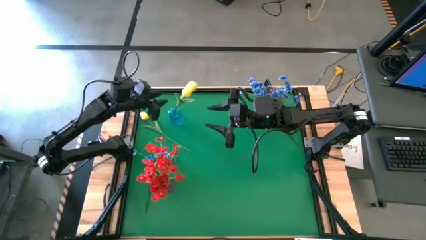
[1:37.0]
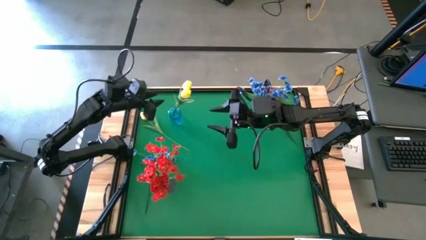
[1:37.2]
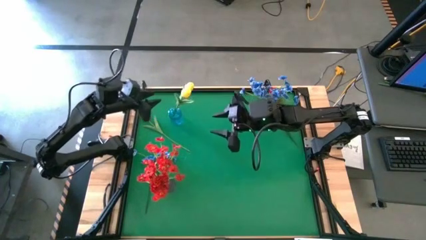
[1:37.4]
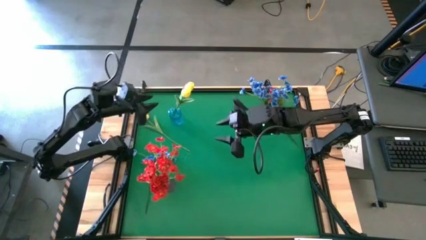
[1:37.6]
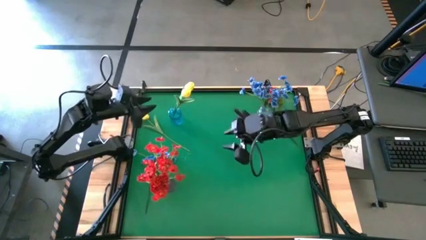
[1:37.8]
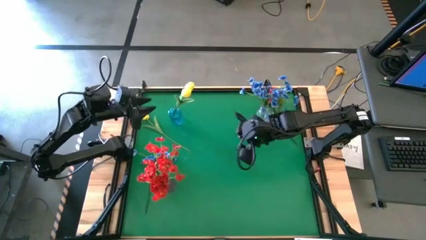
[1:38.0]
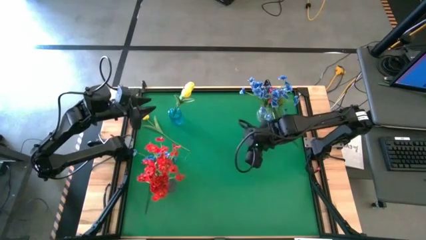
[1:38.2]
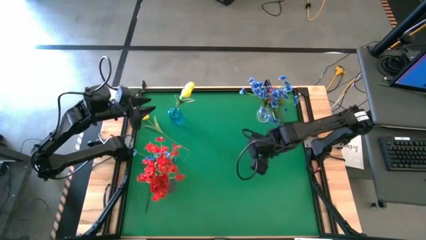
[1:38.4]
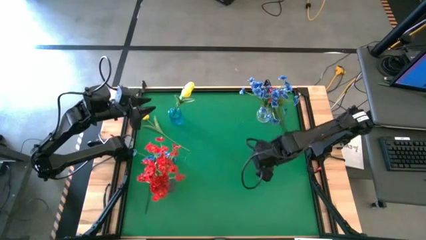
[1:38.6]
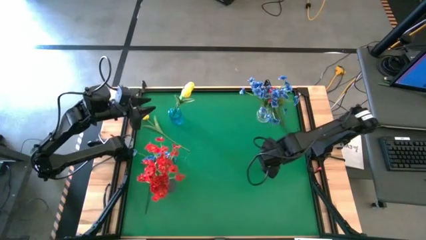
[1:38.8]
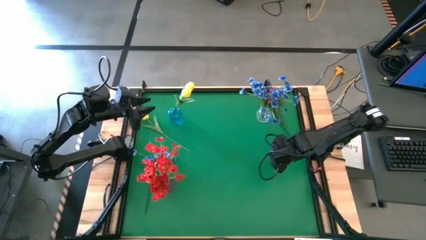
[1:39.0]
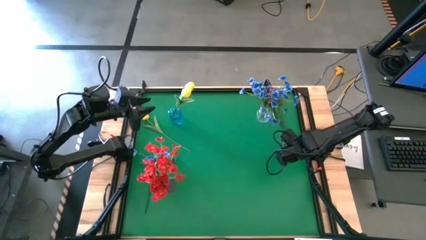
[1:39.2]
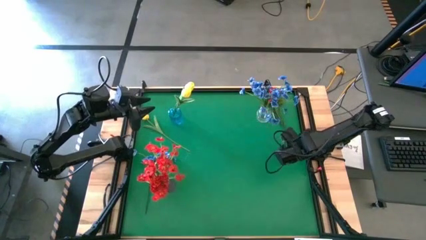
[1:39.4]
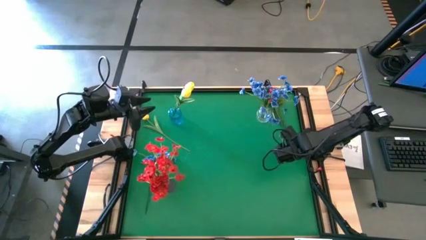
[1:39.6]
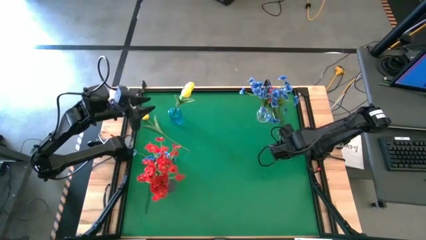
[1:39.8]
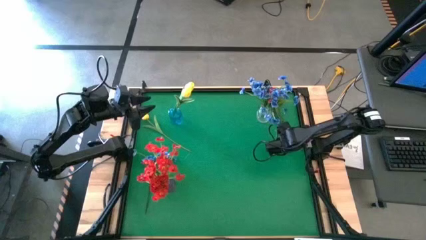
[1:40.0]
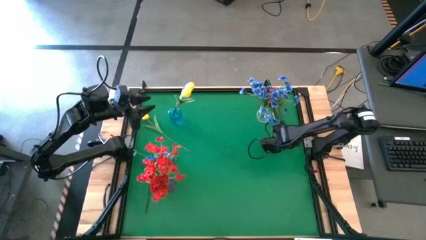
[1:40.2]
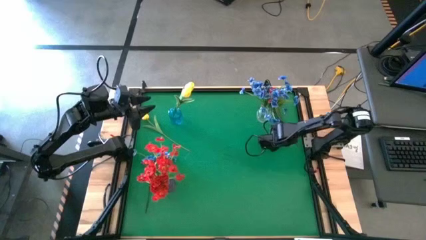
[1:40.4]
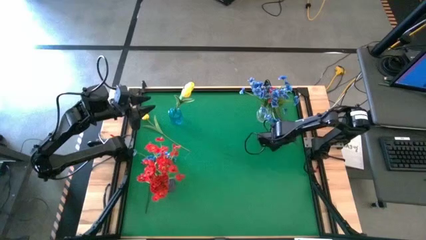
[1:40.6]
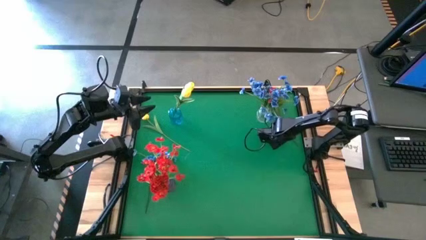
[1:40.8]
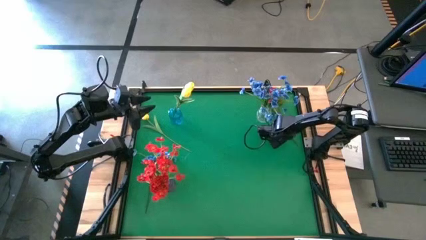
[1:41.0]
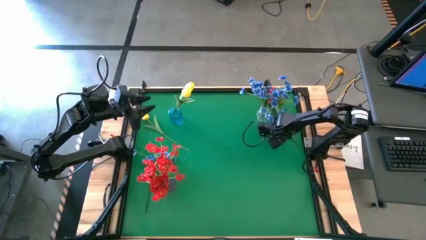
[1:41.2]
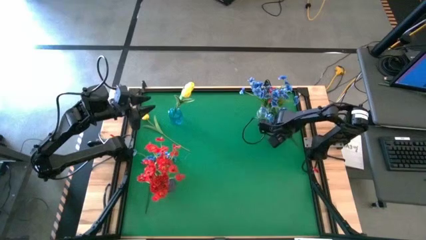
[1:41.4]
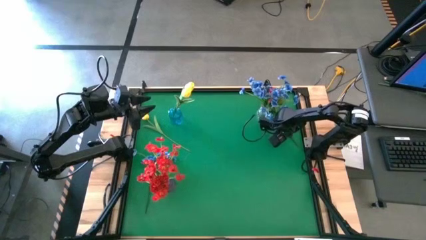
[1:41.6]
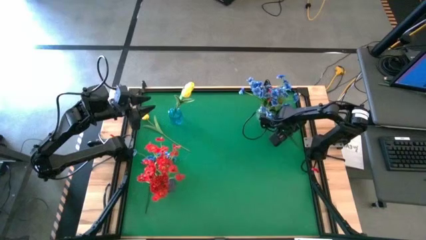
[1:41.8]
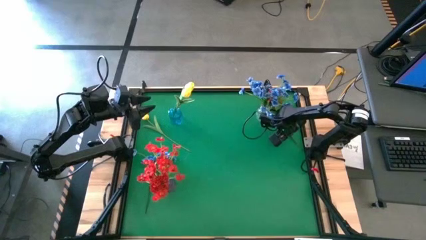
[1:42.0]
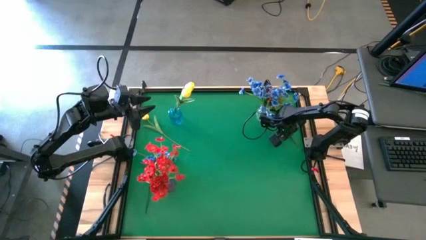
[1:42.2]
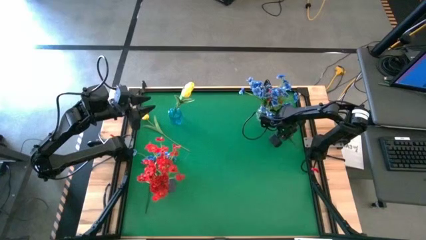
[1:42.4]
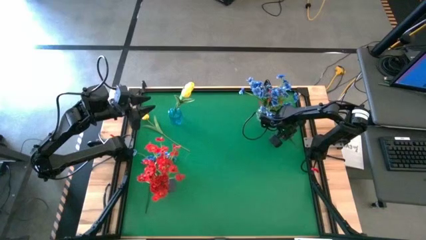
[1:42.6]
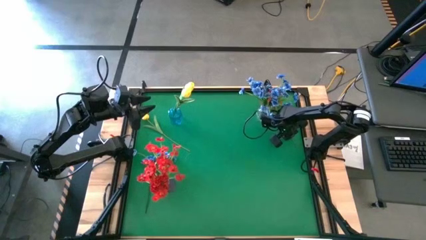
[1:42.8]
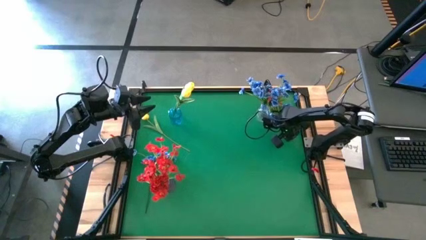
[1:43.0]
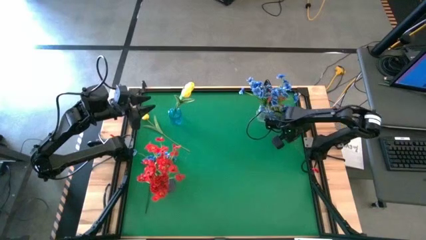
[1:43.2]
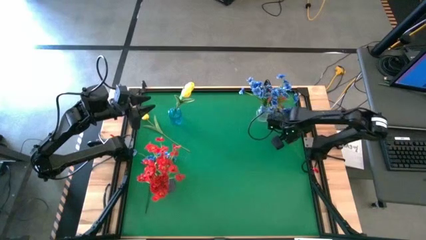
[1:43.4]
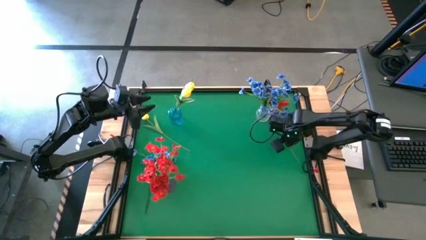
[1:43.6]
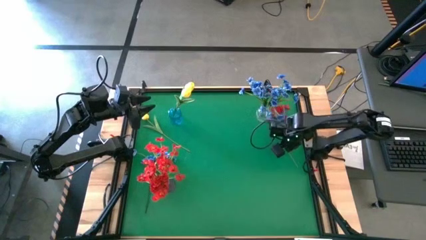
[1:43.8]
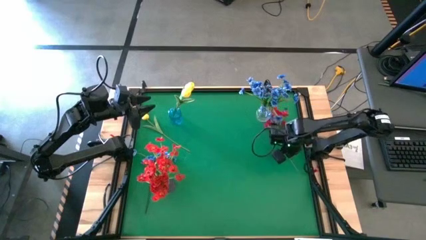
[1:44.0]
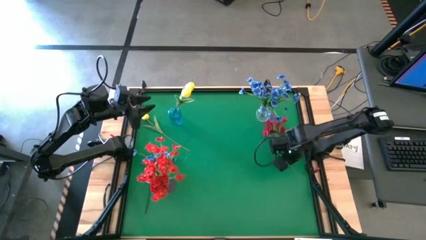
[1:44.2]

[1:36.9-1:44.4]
Task: Sort flowers into vase by color
Put the red flowers into the purple vase

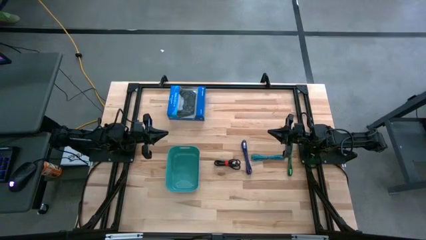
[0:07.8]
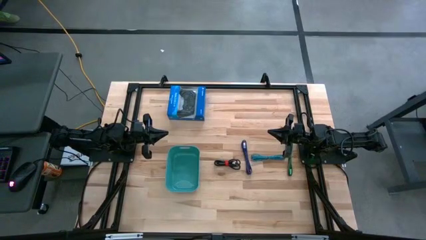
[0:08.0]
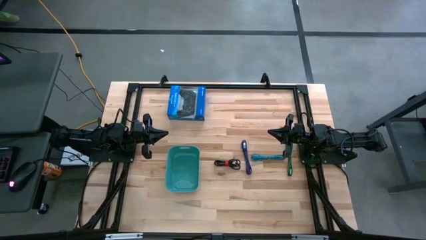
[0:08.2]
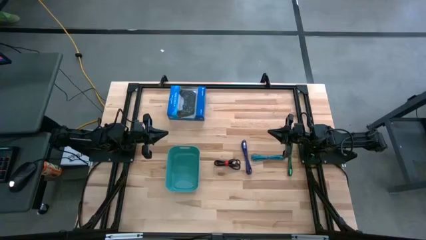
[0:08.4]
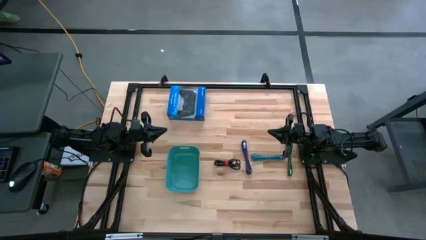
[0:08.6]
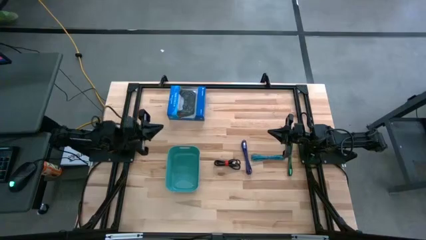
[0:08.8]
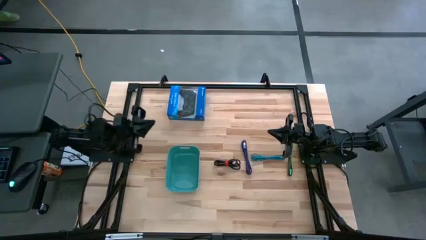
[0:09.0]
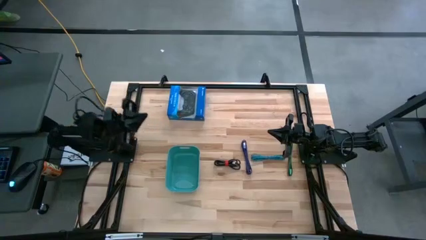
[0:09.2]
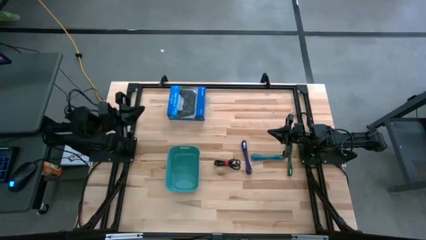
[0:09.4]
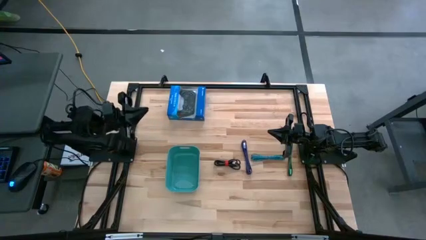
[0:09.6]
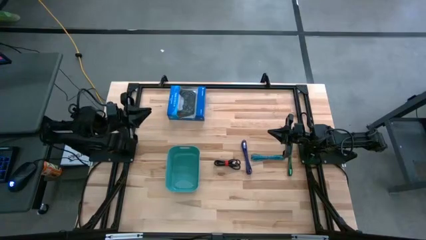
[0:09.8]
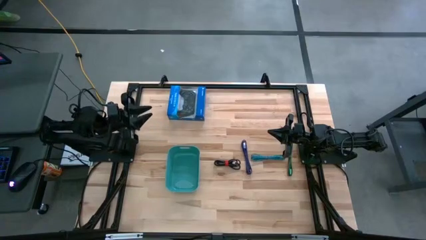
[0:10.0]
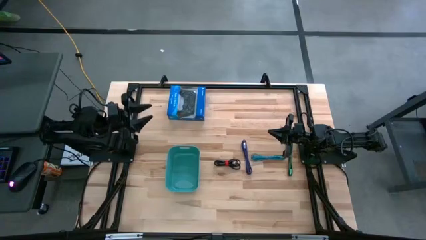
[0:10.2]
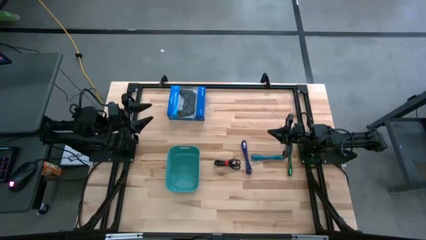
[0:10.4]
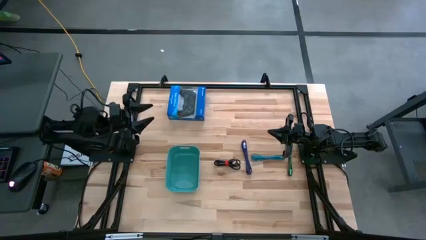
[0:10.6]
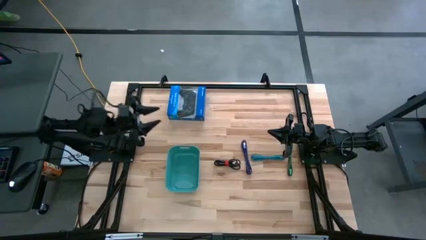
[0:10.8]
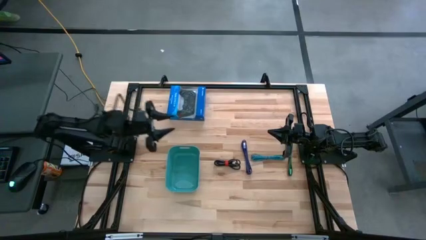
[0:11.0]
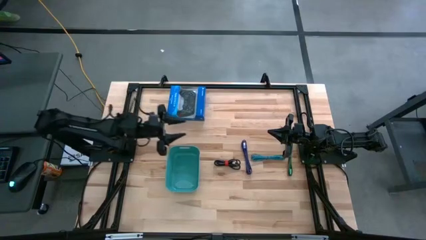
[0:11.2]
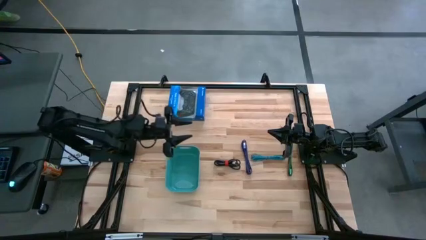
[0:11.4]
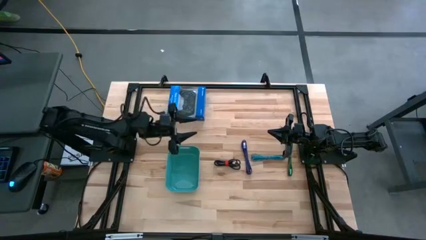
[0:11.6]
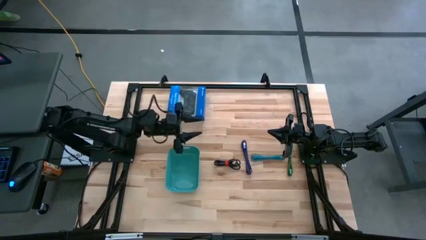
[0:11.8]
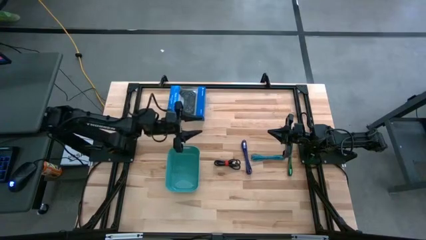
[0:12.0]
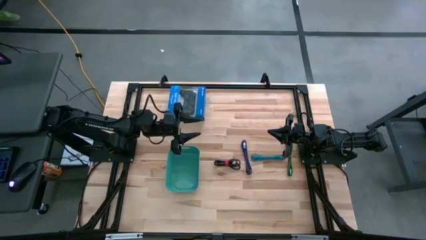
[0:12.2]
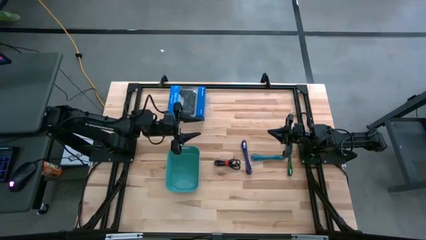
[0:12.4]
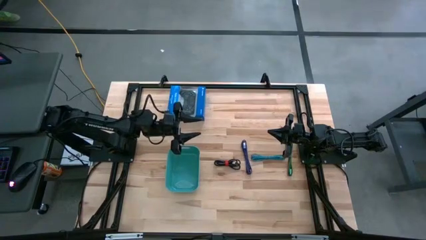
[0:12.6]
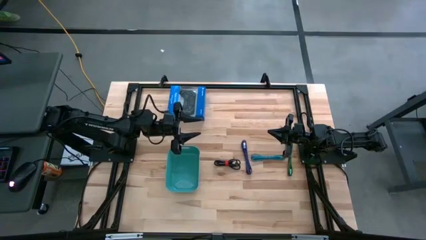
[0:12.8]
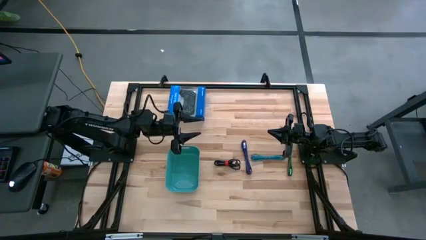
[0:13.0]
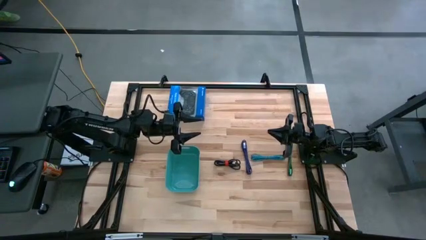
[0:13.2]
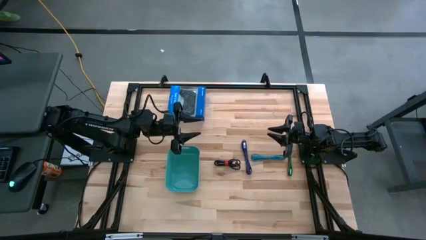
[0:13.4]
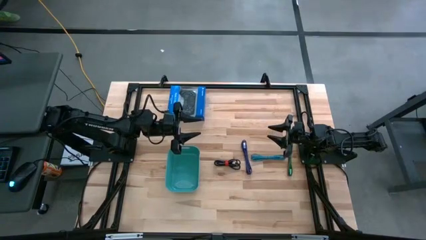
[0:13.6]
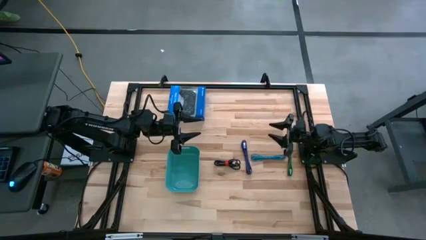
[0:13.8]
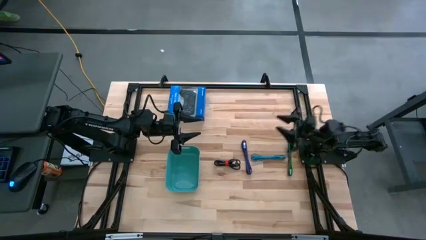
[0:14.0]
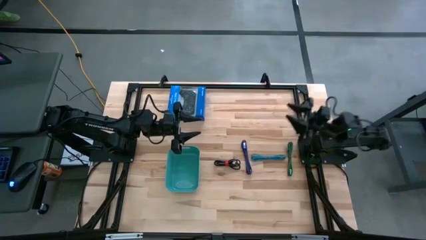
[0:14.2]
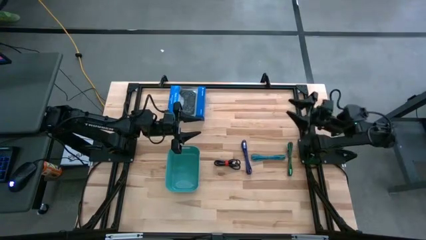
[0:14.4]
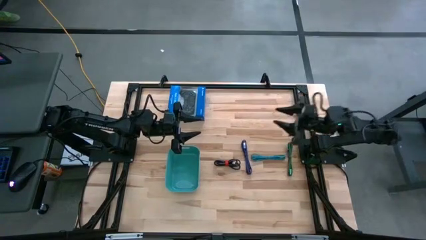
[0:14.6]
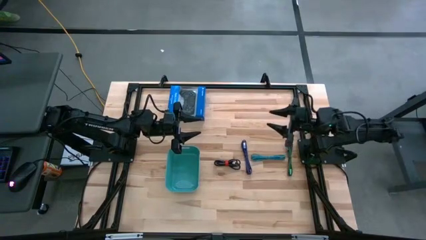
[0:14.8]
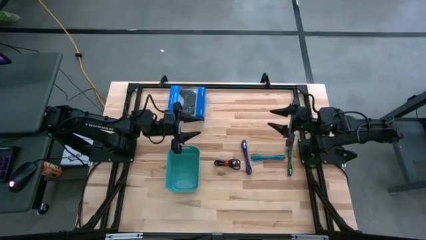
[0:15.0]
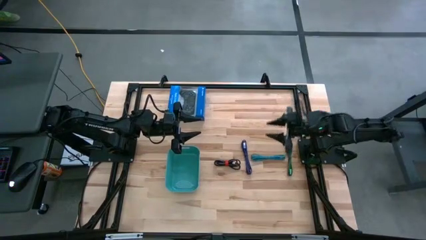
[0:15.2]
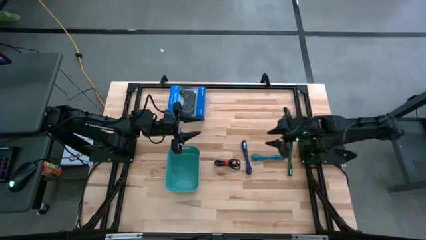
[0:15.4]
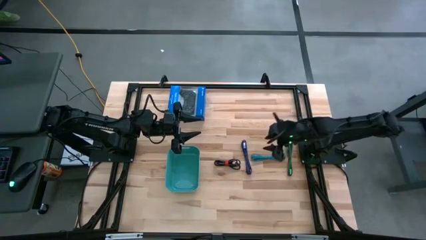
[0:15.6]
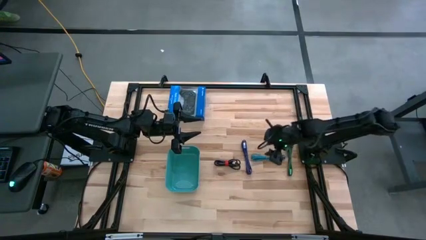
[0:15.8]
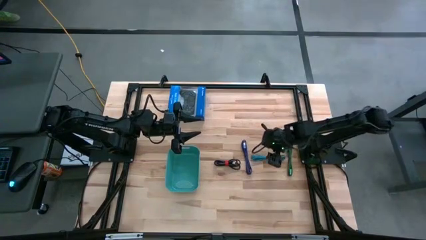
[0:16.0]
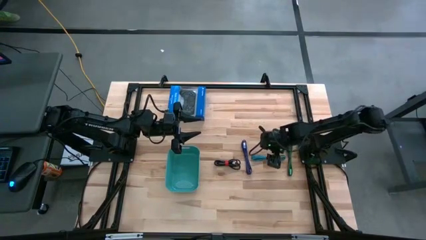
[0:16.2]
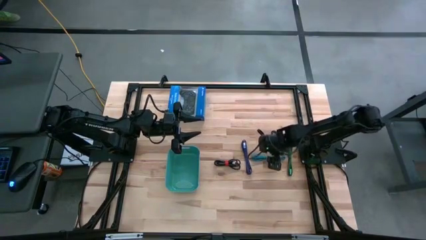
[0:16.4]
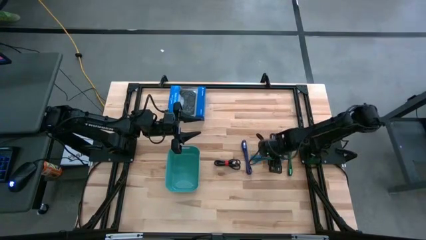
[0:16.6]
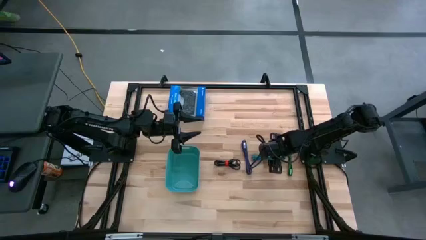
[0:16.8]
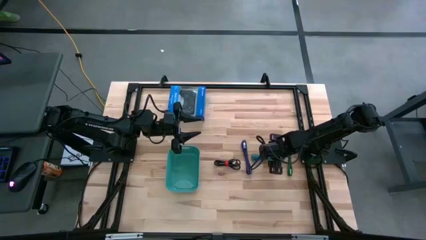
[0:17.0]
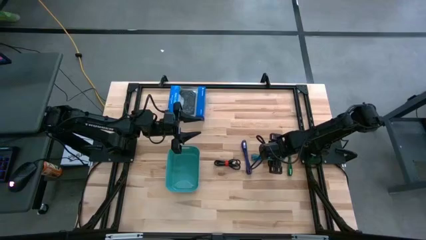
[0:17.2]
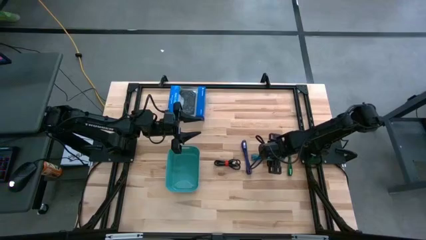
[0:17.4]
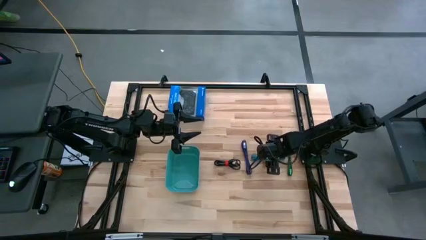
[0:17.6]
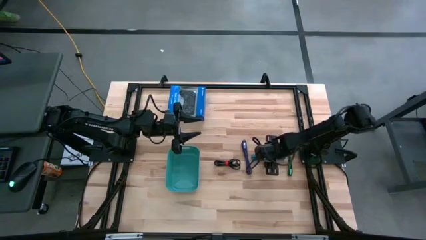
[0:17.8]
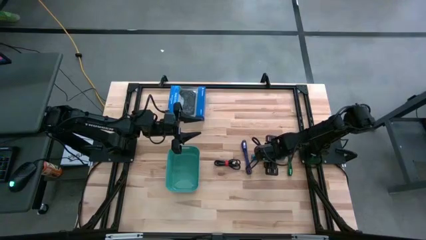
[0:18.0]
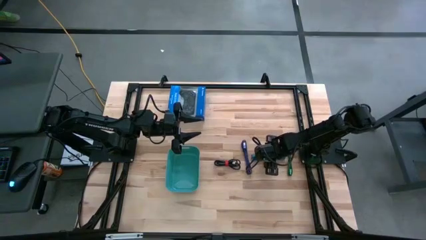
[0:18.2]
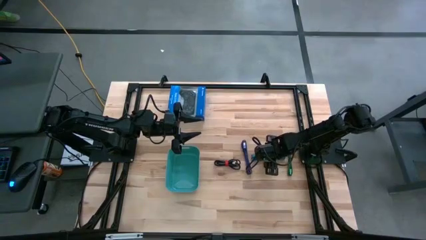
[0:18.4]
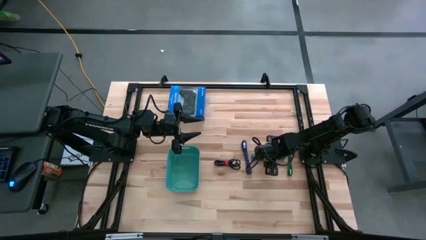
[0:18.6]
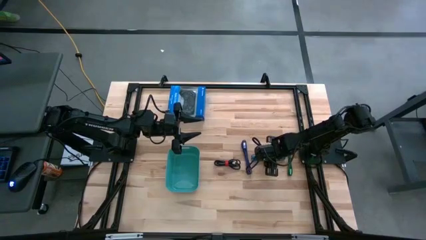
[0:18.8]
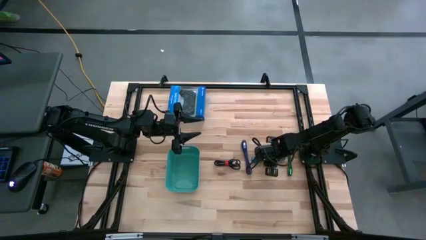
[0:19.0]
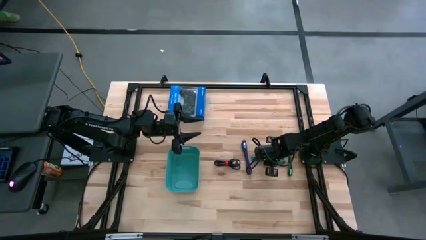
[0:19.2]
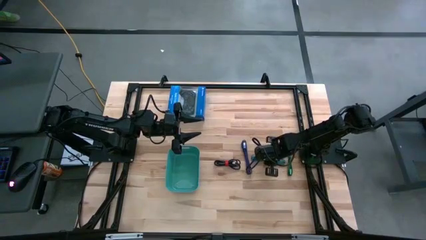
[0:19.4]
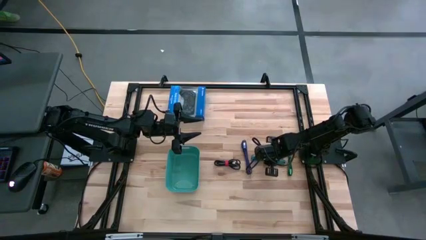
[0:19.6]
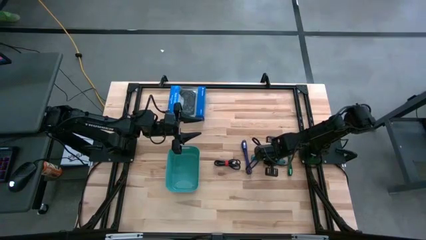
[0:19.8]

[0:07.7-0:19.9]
Task: Pick and place USB-C Cables
Put the blue charger cable into the green bin
